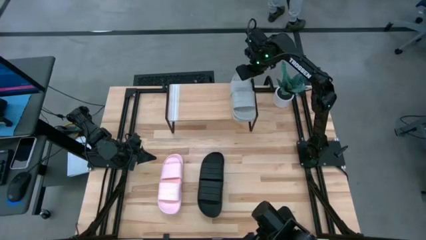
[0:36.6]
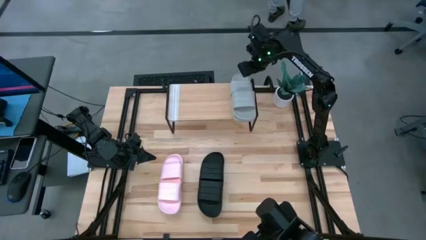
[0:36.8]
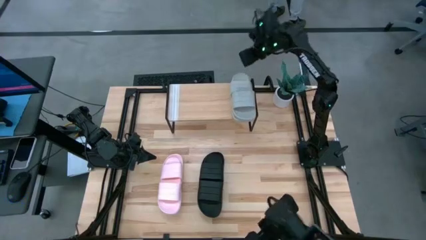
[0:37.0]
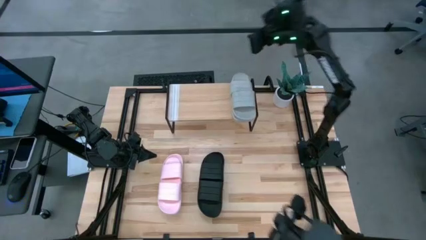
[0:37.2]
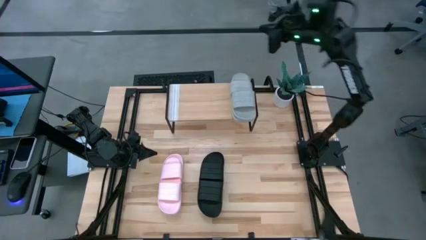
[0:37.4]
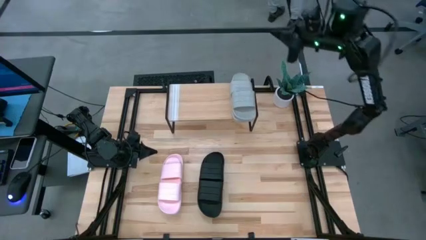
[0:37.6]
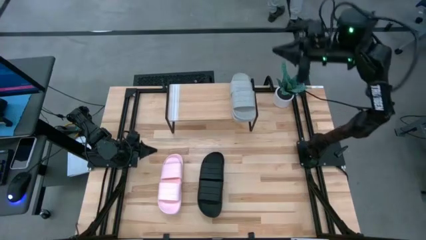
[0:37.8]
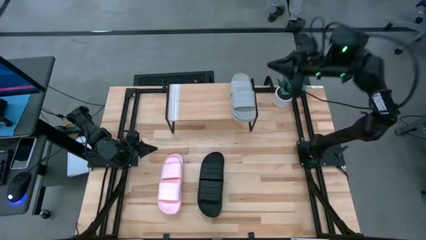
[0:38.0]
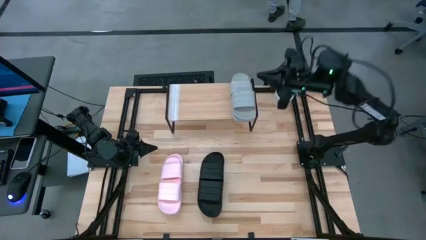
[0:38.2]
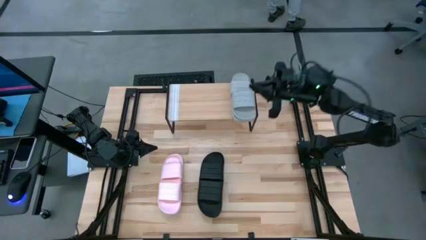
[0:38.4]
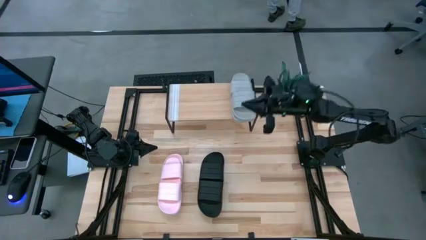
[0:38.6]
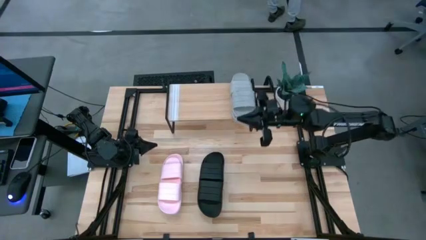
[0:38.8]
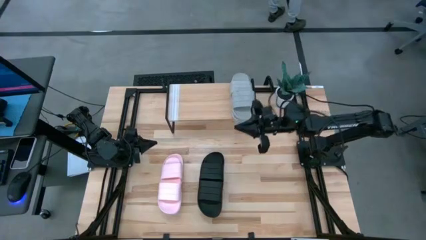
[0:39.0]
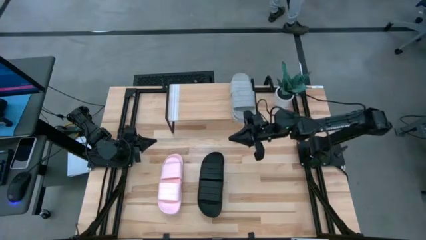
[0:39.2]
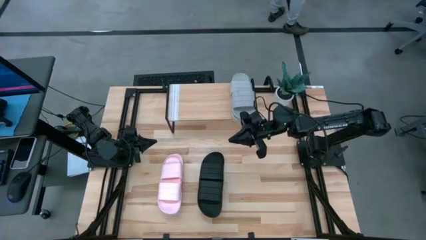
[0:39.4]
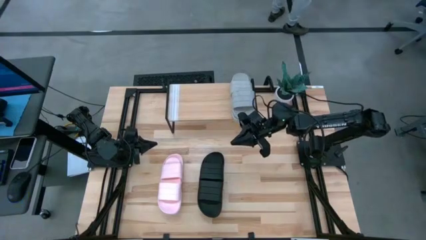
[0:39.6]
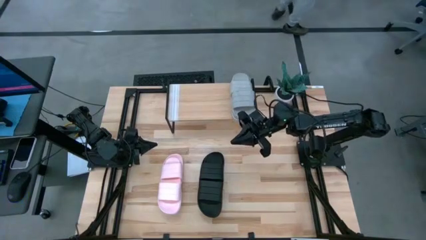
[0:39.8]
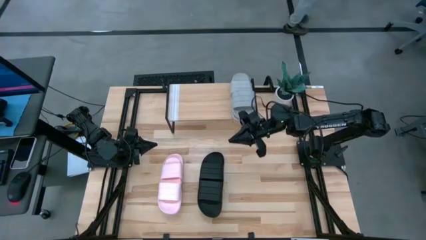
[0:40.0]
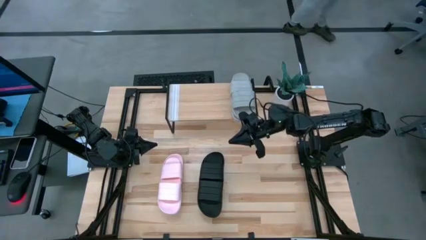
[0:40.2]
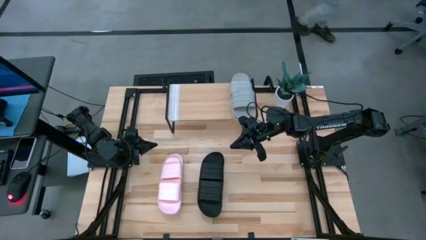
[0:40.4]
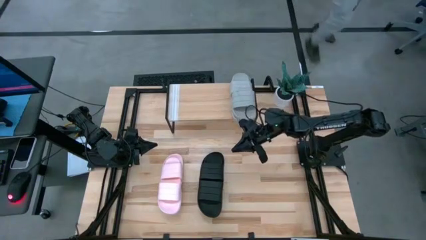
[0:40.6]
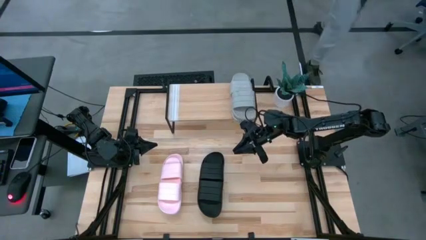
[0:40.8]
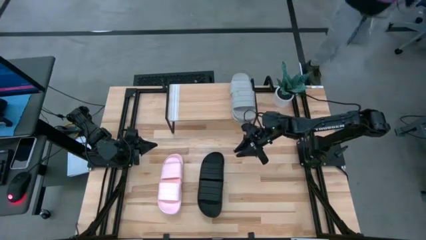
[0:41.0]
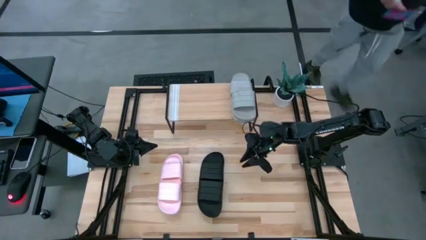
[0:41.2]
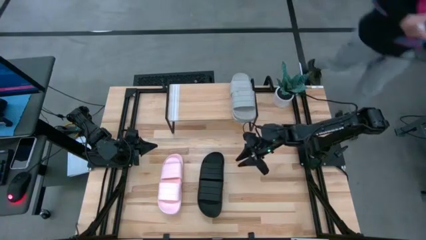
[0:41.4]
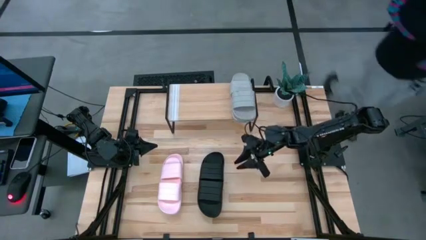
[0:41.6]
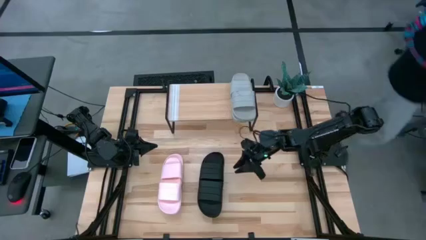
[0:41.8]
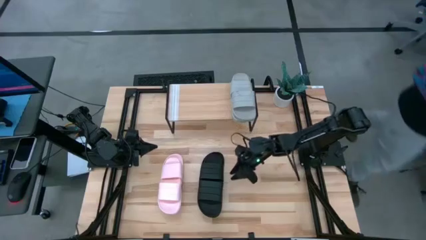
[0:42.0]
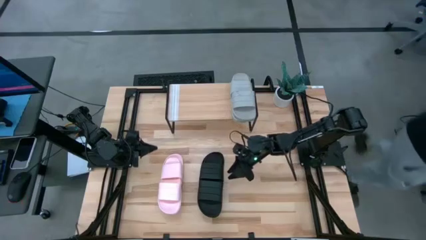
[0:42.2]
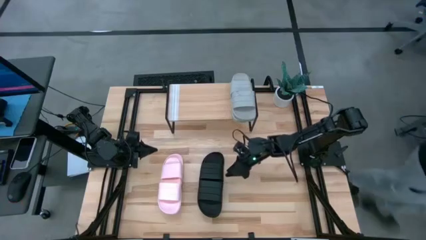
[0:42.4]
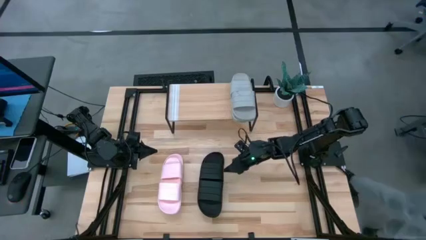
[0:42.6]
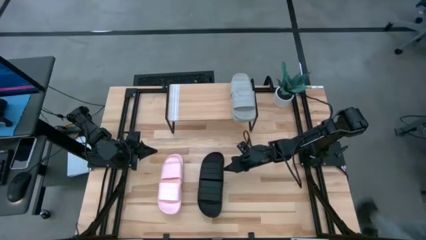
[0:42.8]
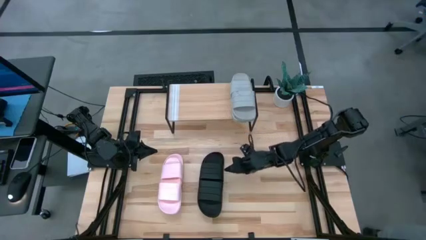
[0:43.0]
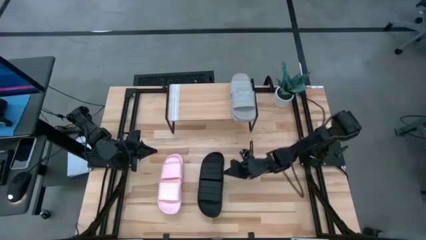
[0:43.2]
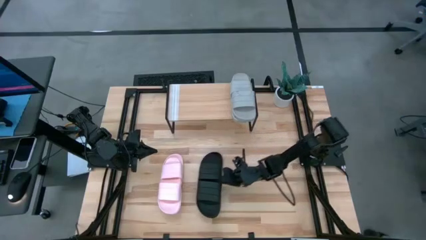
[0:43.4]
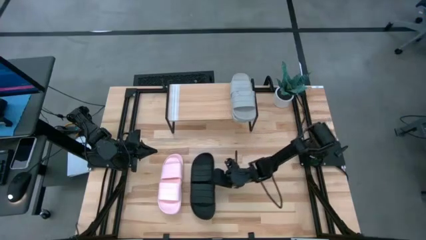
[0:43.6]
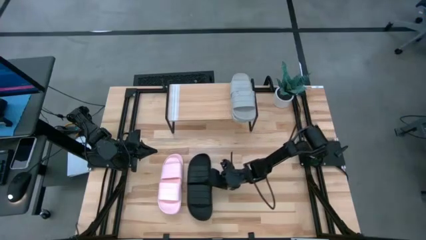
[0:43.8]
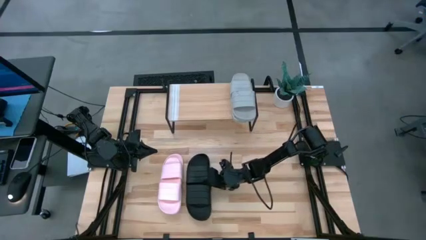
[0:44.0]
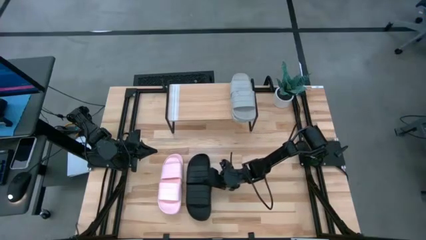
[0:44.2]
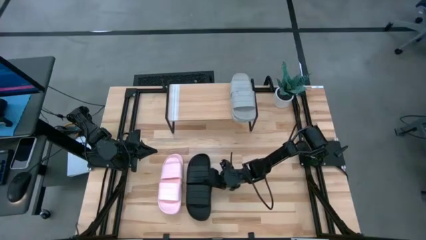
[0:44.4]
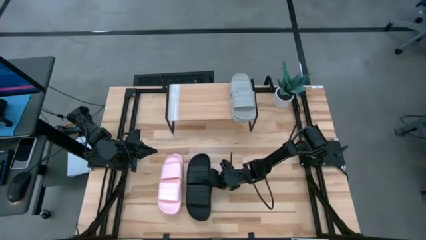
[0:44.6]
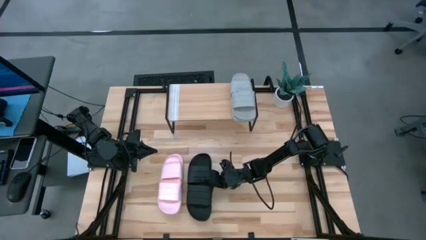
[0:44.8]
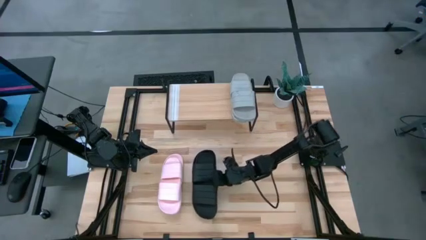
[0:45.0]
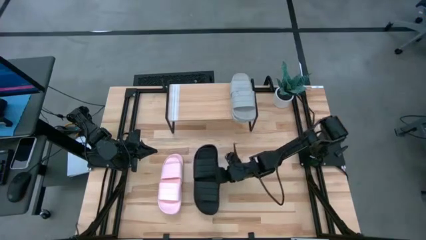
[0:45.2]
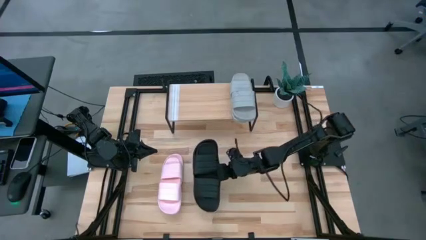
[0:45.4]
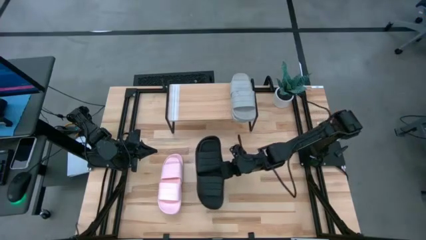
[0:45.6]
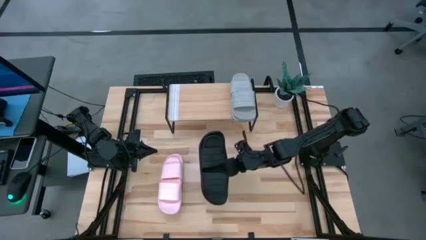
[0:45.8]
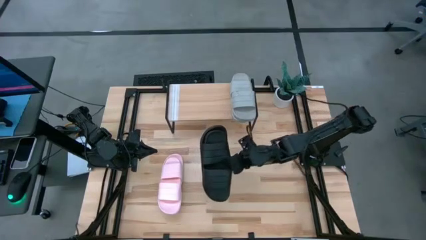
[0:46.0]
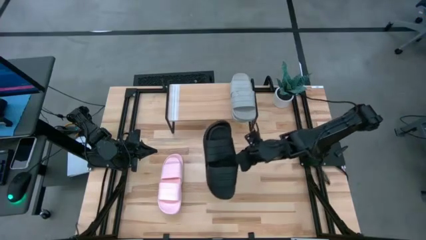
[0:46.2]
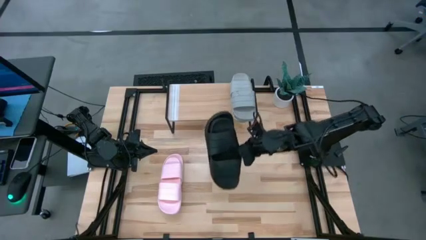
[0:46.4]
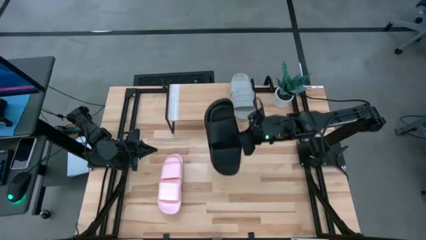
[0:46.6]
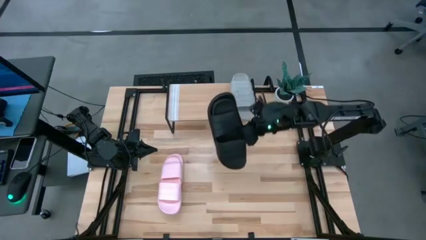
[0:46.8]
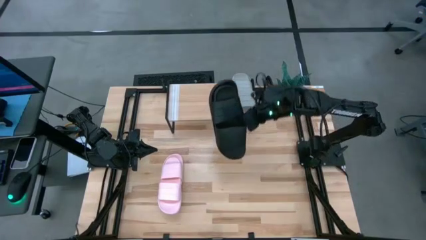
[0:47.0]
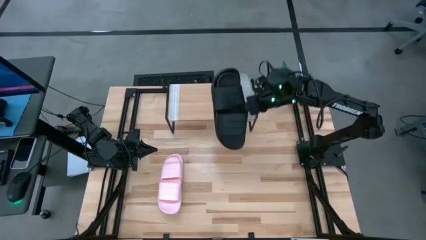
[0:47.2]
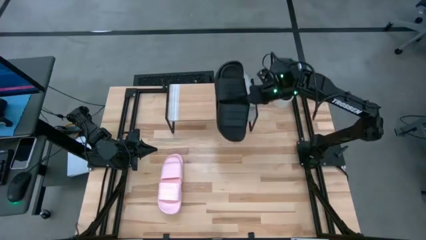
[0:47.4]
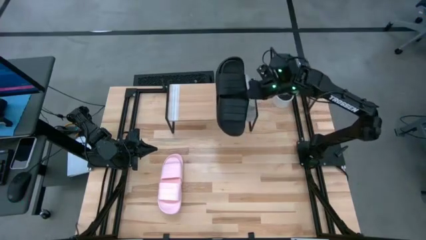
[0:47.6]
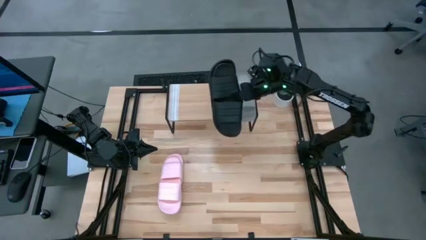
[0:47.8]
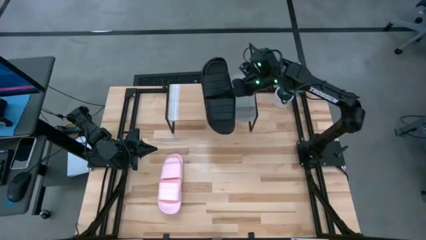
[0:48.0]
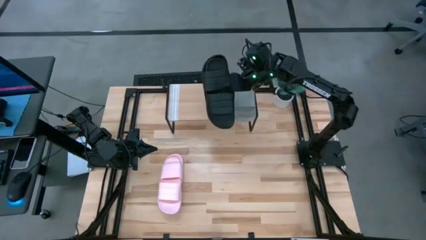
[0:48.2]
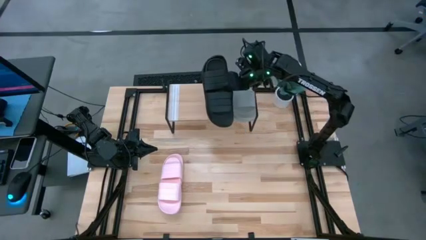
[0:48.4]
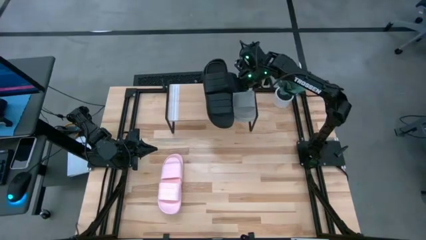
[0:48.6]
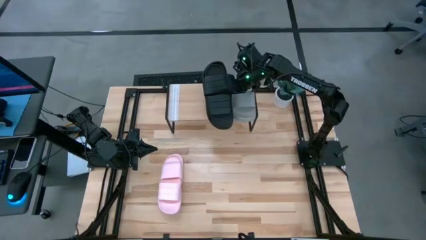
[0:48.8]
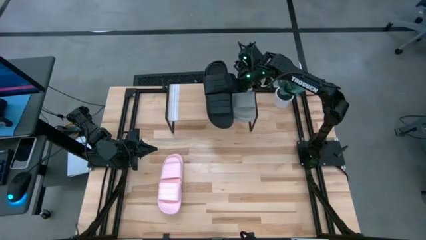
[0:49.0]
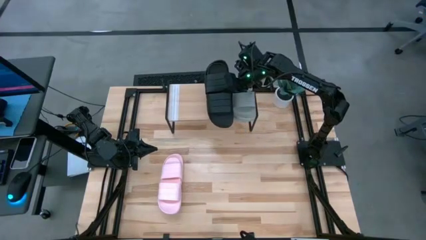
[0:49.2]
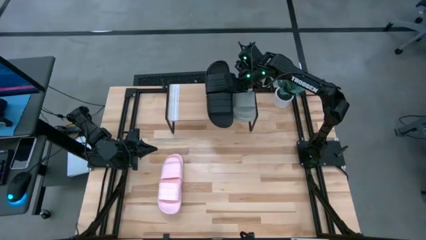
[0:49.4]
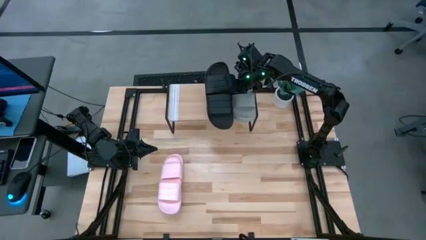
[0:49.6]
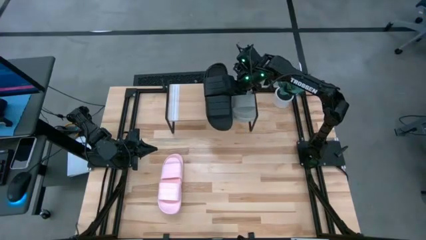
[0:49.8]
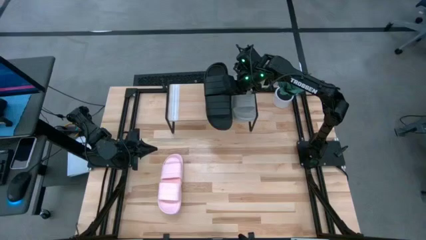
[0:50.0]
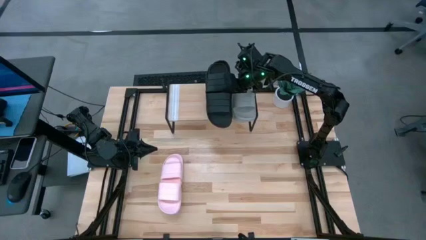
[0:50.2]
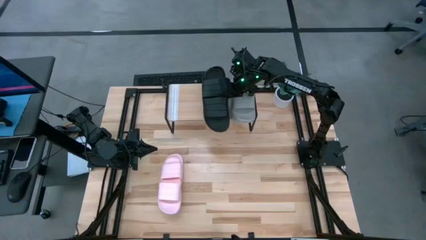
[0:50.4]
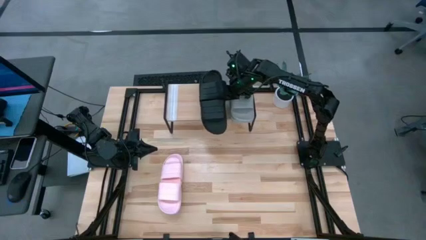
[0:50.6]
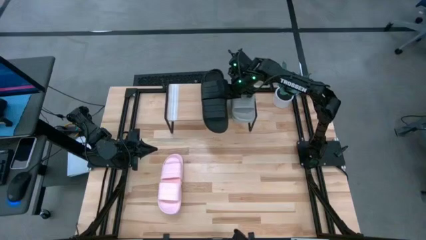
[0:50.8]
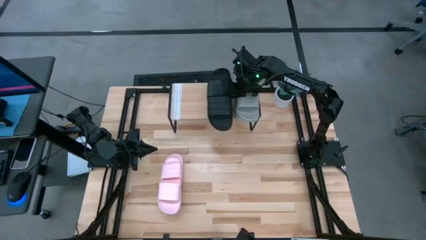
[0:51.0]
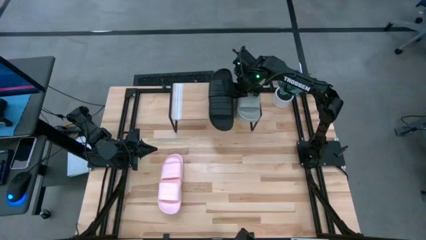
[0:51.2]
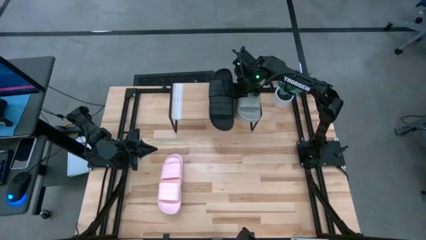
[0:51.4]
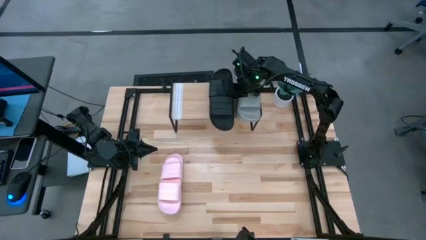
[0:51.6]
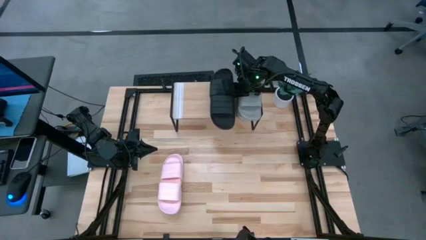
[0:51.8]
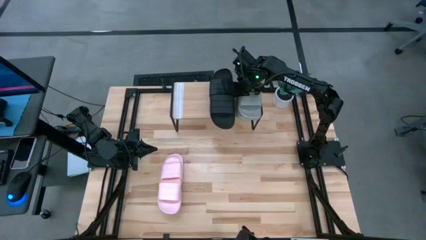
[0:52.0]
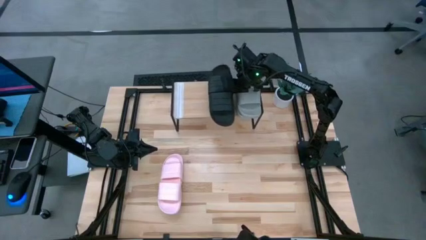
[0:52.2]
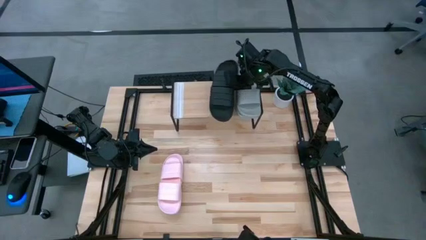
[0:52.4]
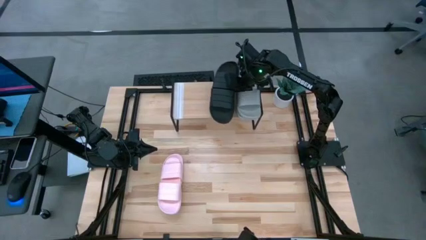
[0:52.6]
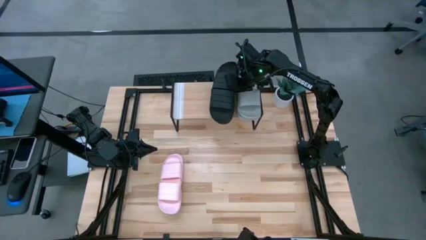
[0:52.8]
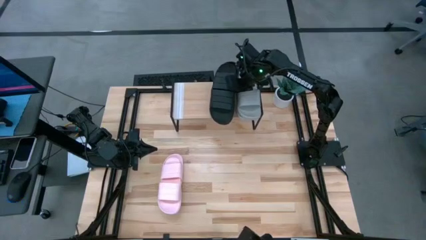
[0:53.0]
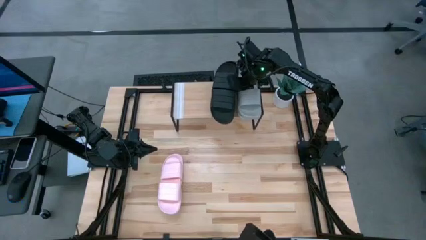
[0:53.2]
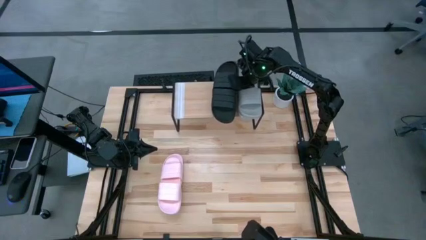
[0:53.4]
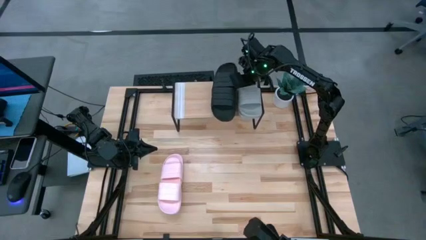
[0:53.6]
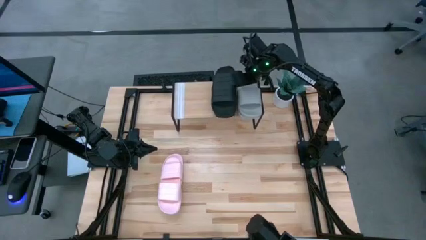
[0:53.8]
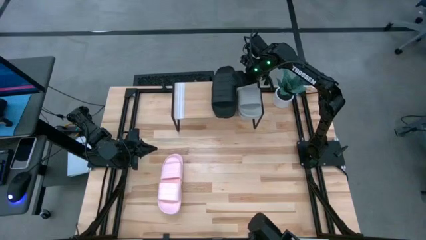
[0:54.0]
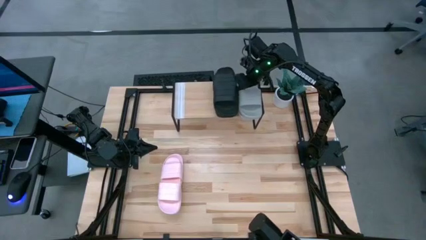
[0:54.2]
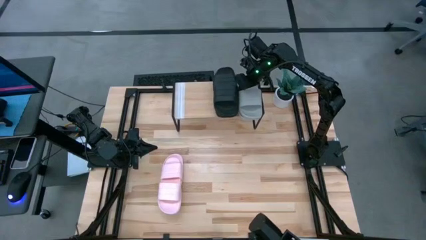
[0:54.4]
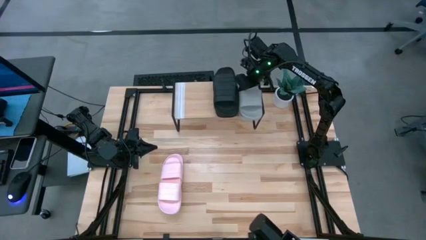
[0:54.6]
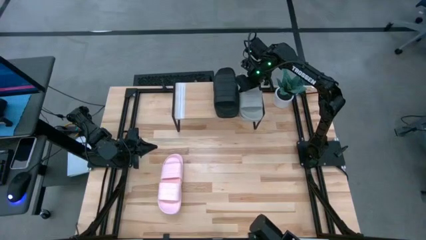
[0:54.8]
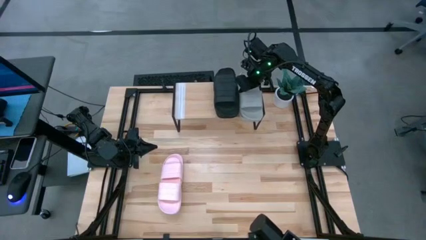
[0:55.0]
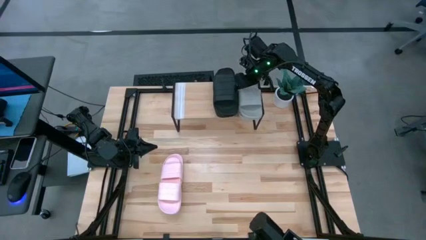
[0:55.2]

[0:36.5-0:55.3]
Task: Pick and place slides into the shelf
Put the black pair of slides on the shelf
